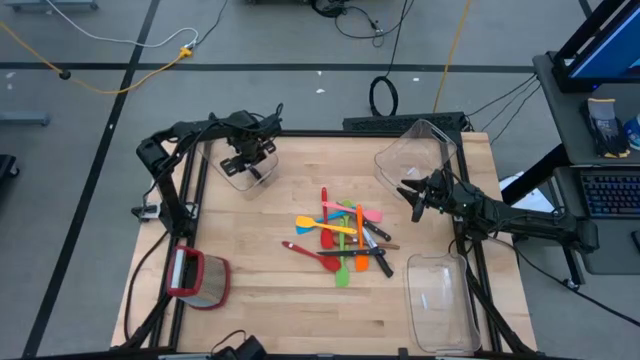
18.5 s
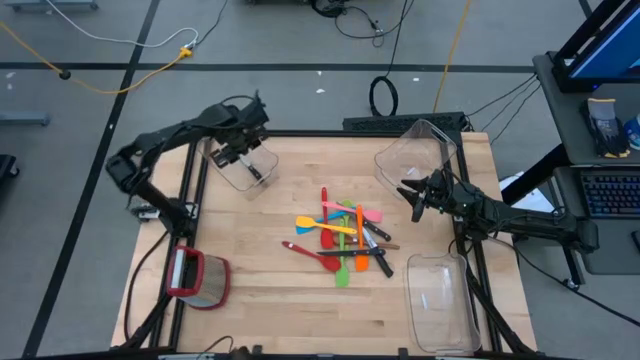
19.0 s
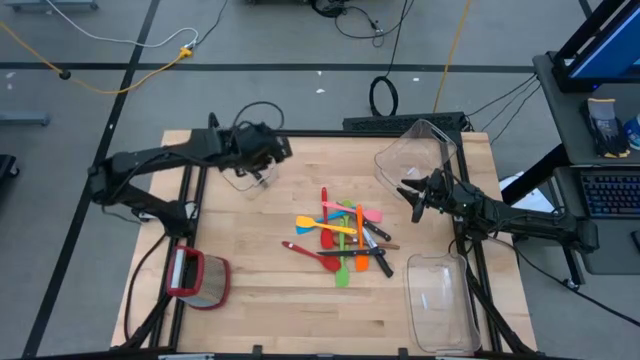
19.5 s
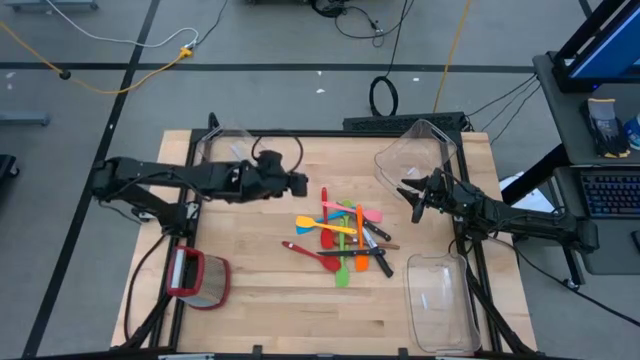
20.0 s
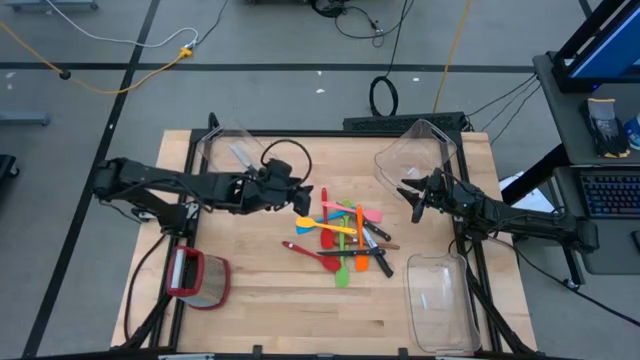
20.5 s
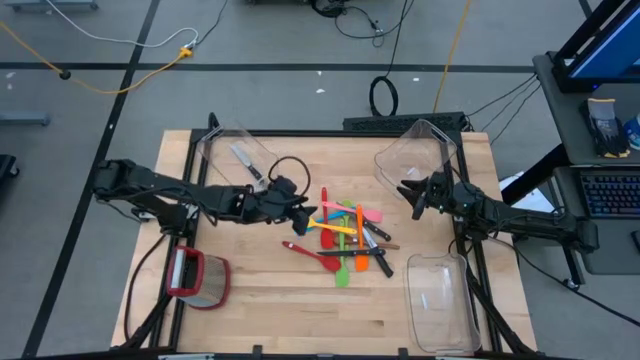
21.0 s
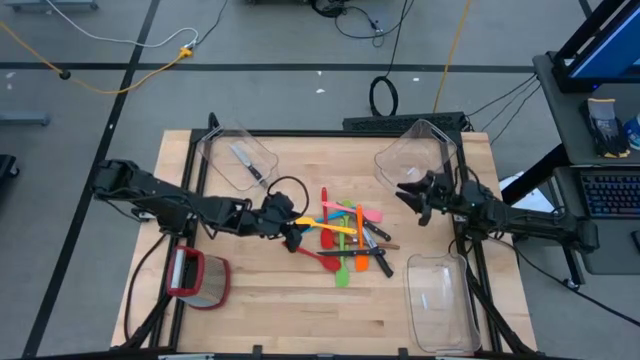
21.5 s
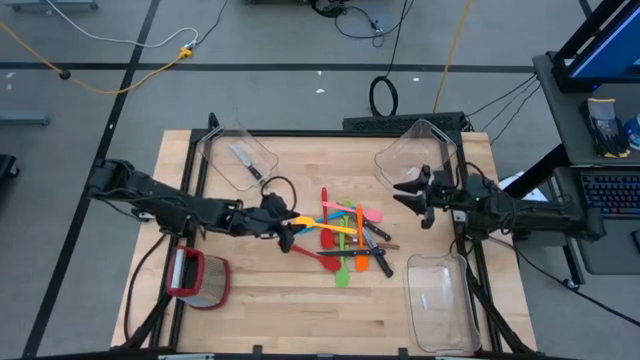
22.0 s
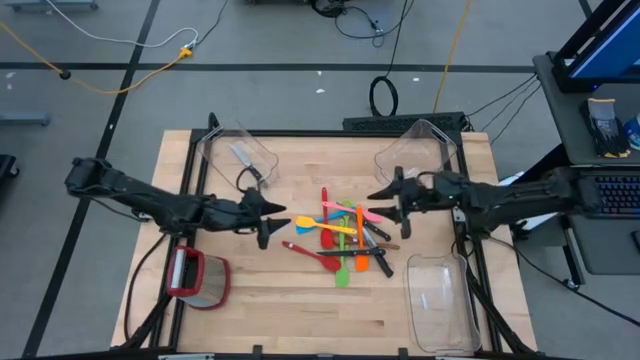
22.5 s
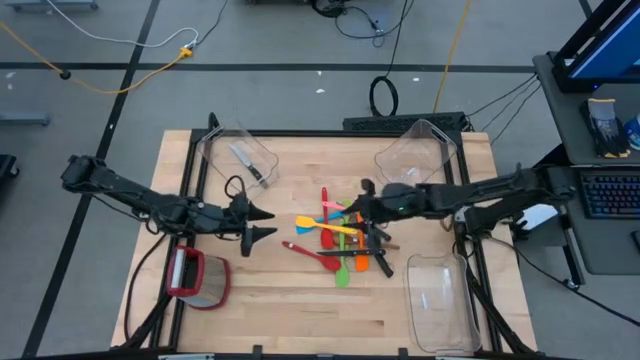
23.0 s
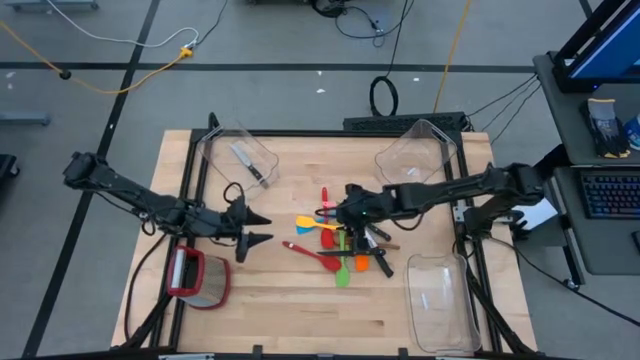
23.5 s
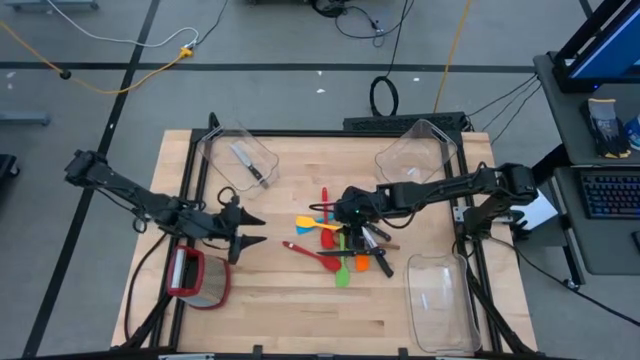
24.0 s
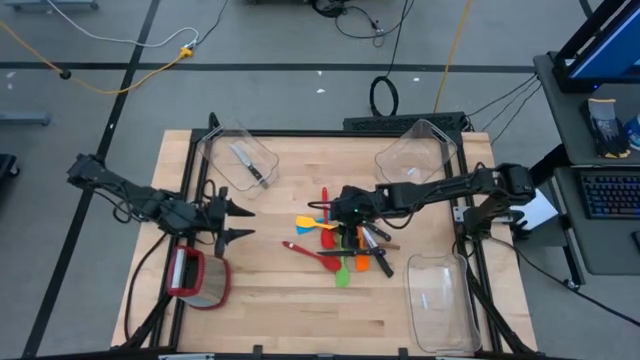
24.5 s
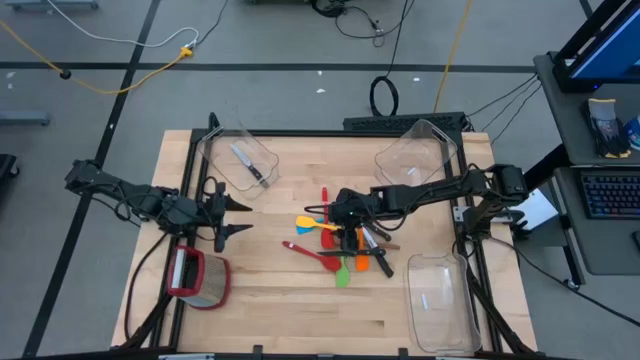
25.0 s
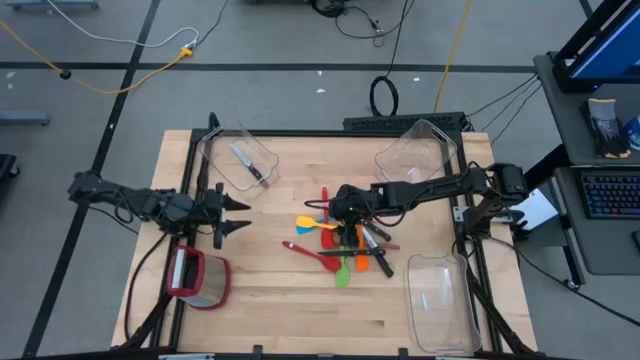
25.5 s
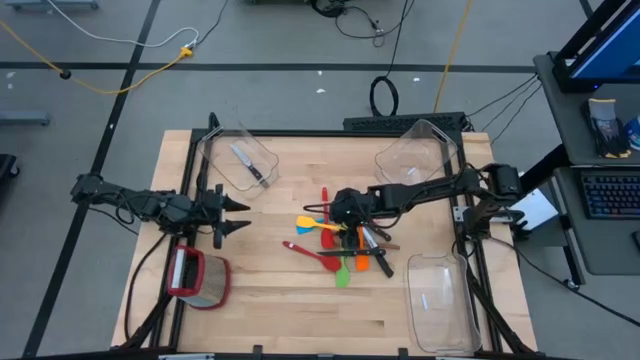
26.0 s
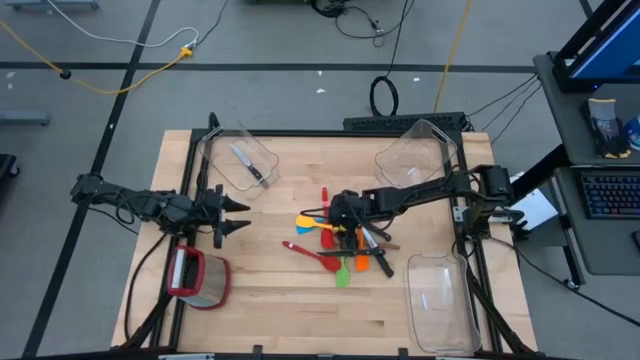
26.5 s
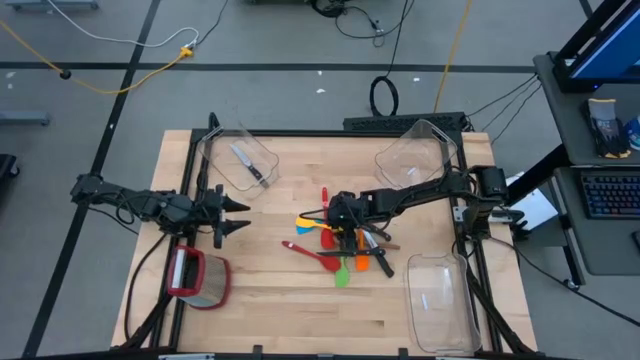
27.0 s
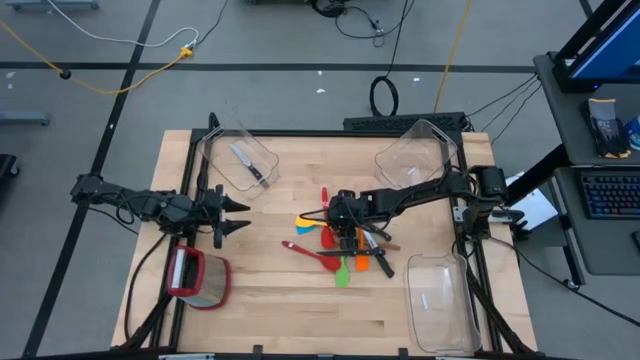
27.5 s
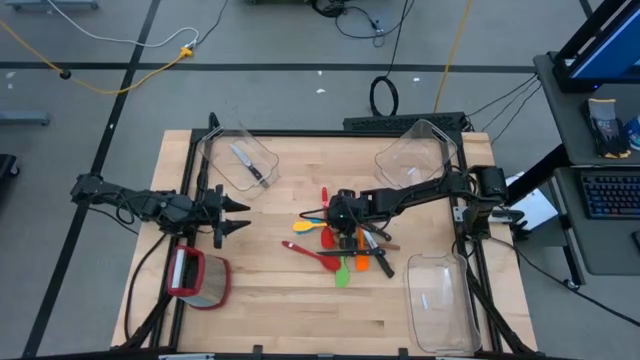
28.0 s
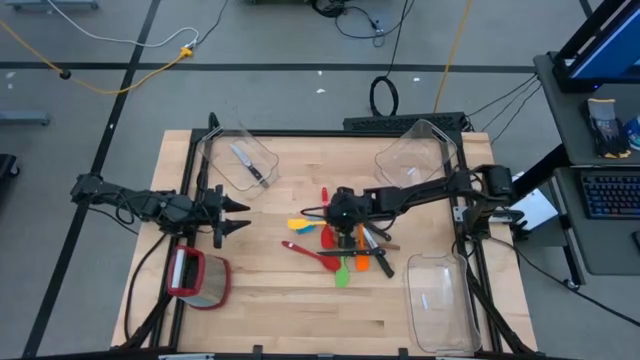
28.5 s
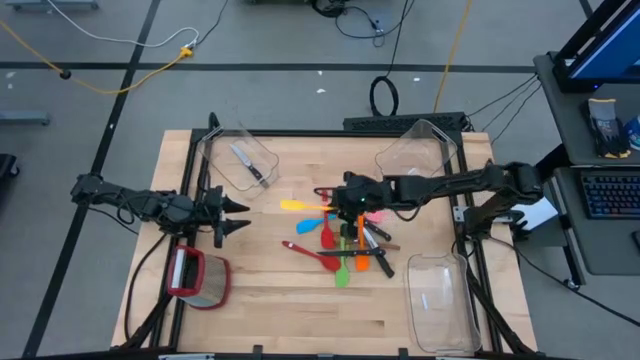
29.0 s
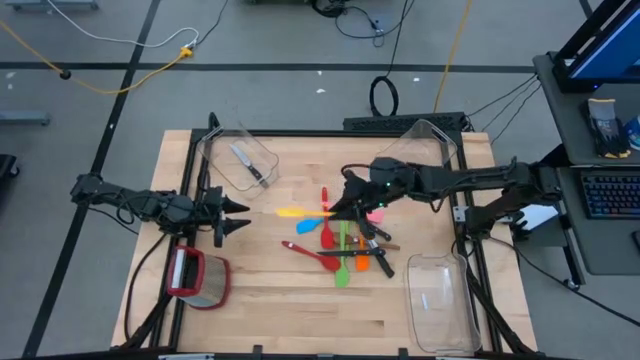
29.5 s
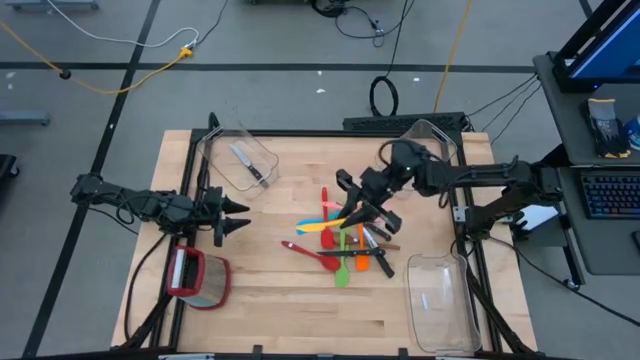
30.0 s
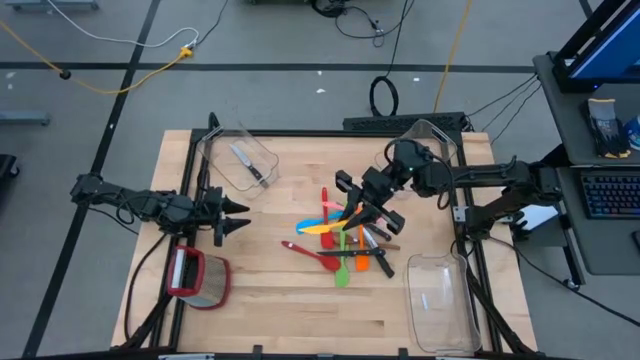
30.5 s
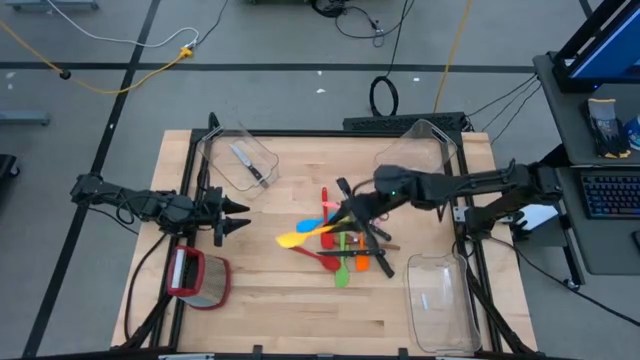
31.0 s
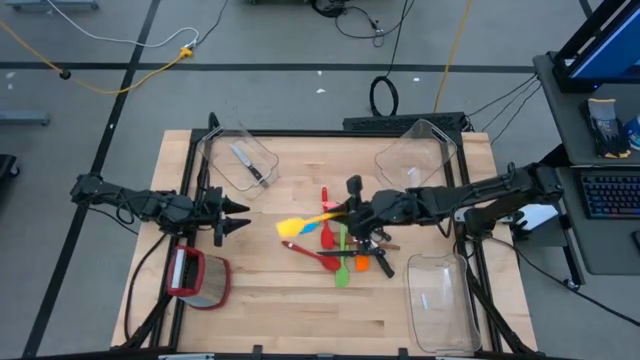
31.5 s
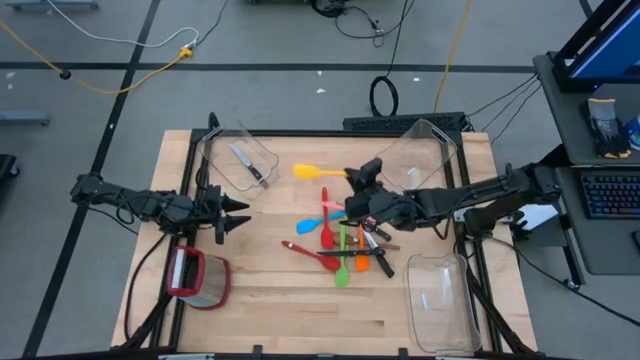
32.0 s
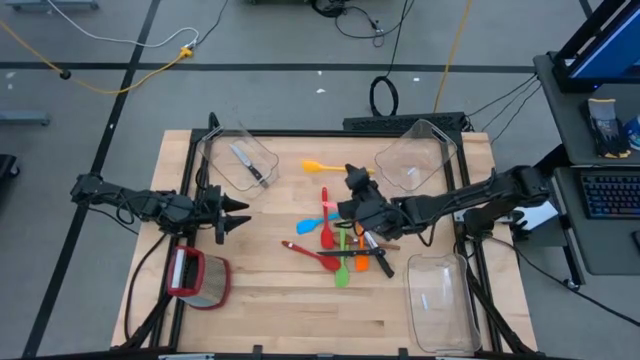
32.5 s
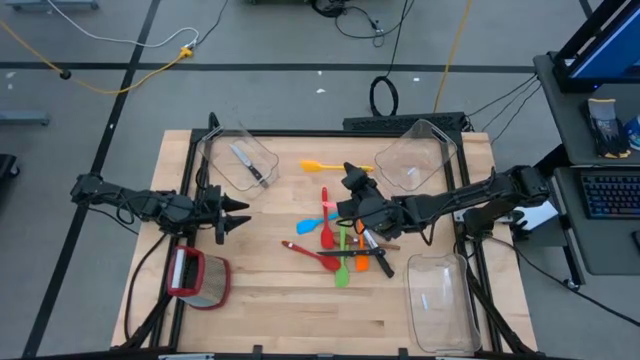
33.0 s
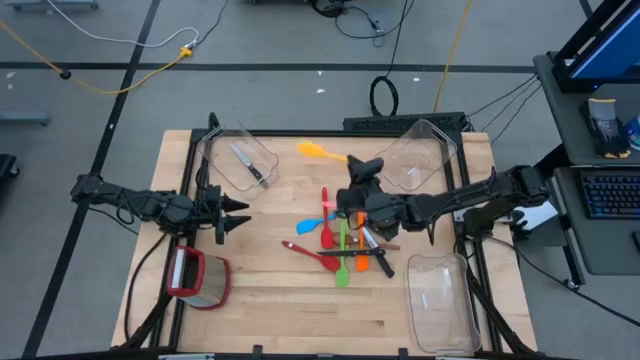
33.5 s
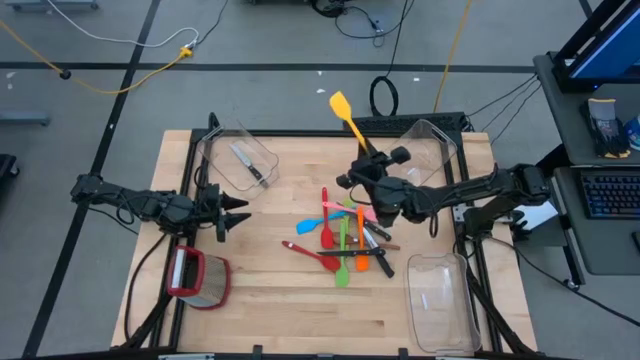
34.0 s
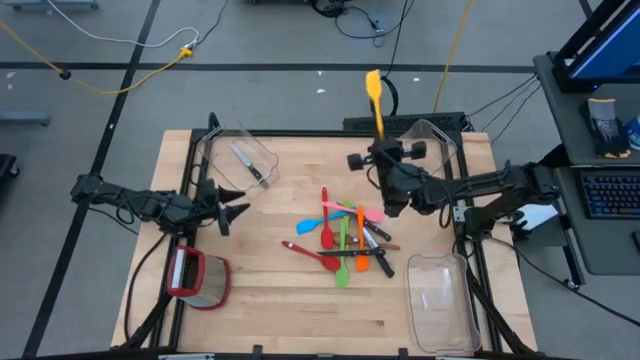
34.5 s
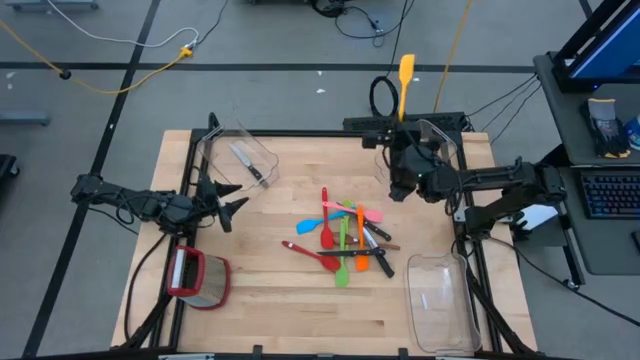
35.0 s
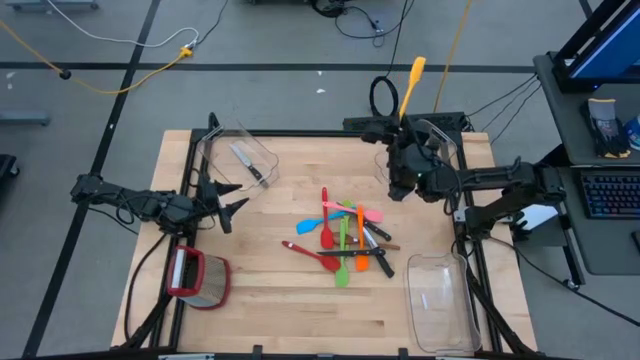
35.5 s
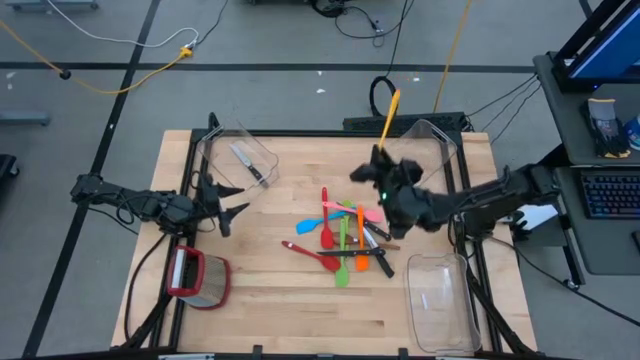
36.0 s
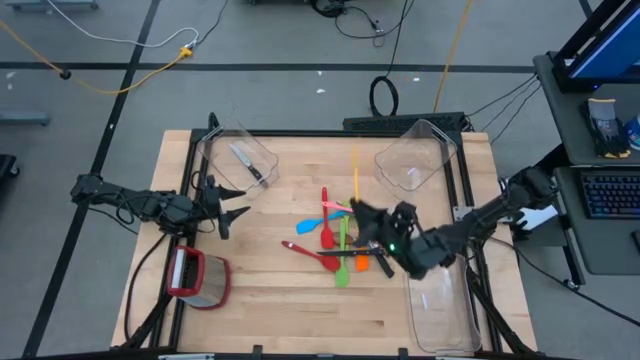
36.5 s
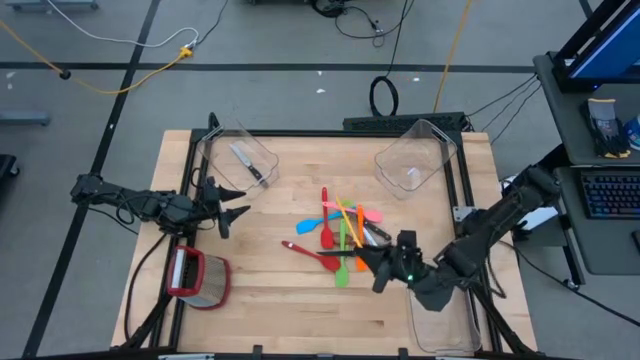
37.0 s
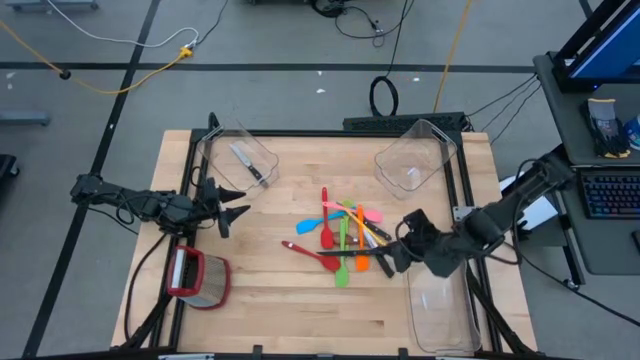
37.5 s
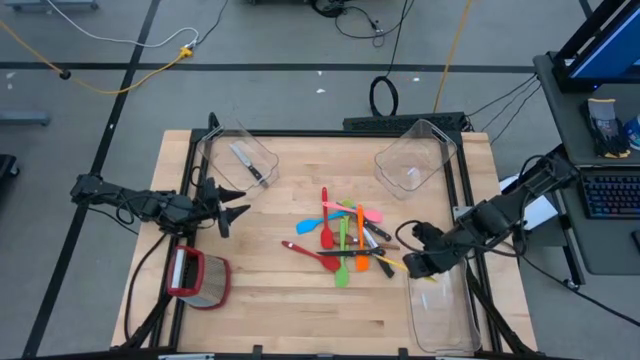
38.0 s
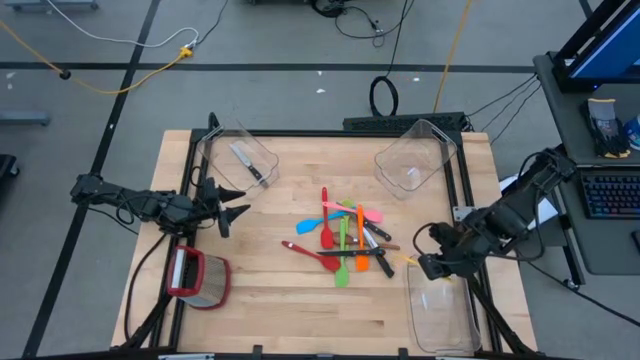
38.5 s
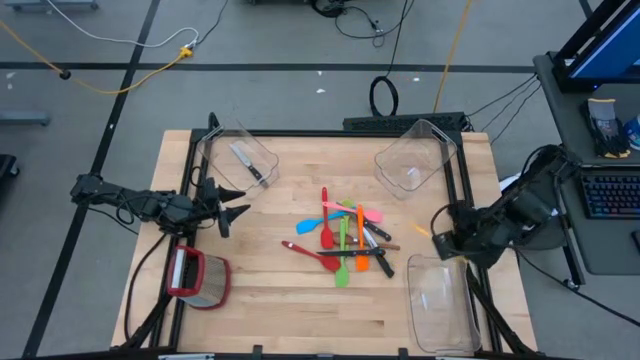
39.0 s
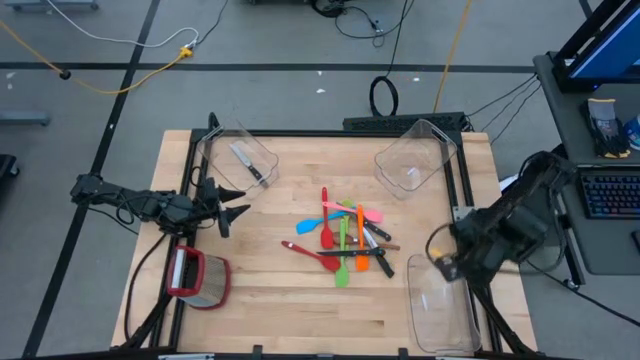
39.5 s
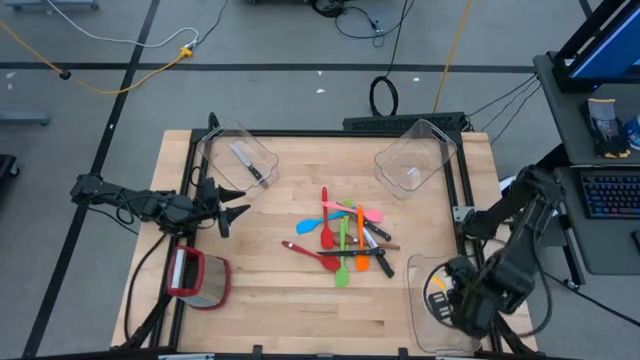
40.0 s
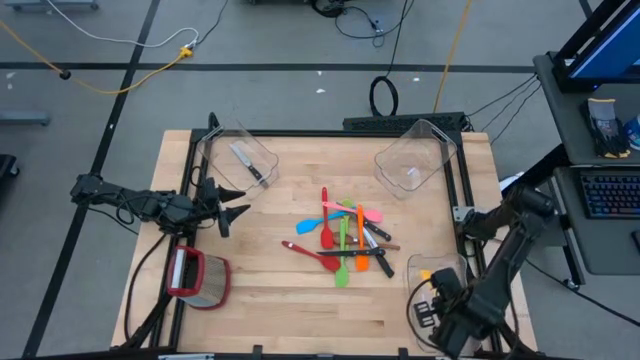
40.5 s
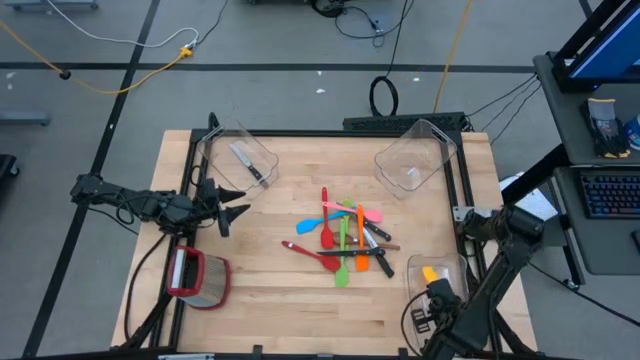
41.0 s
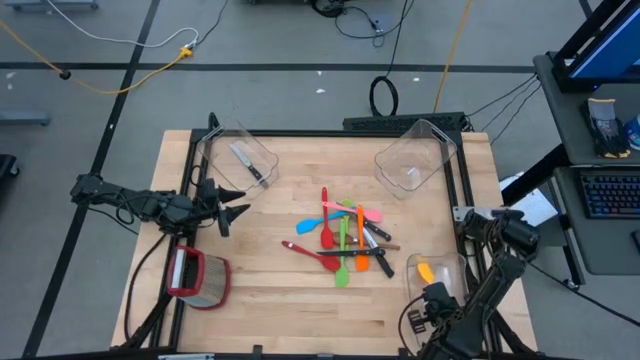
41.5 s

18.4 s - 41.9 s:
Task: Pick & Place Kitchen Items
Put the yellow spatula into bottom transparent bin
